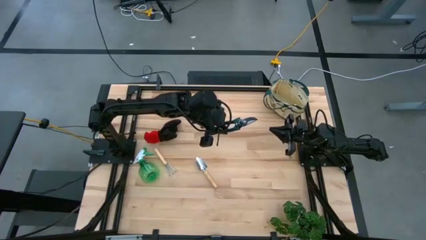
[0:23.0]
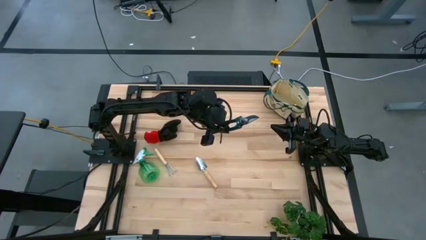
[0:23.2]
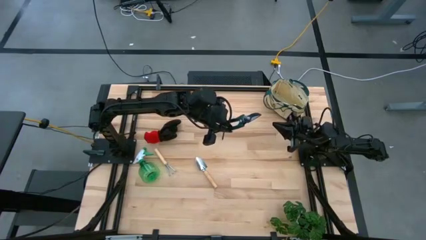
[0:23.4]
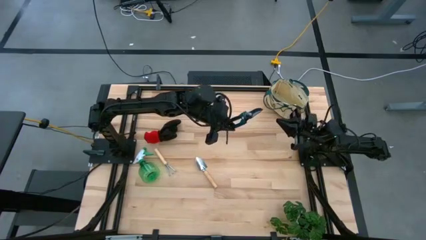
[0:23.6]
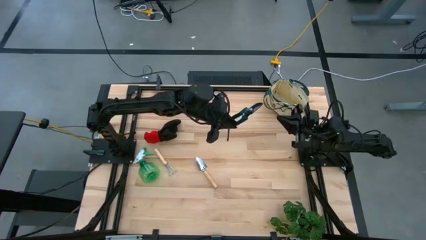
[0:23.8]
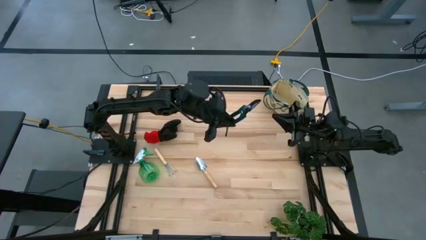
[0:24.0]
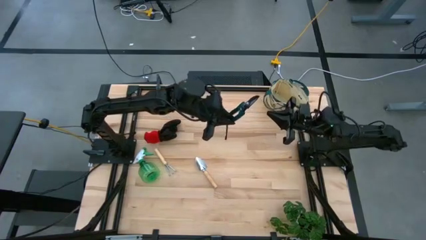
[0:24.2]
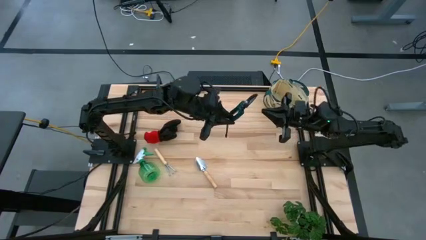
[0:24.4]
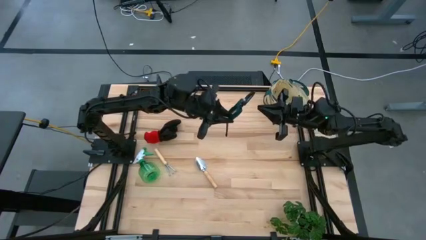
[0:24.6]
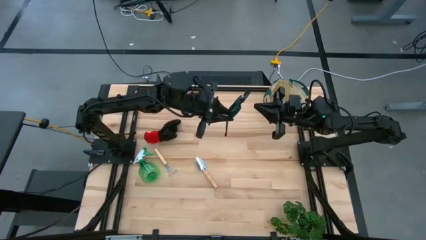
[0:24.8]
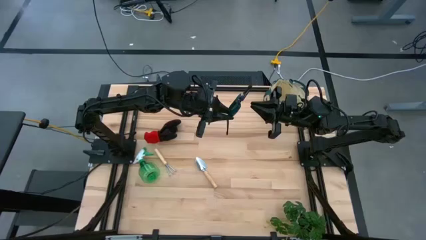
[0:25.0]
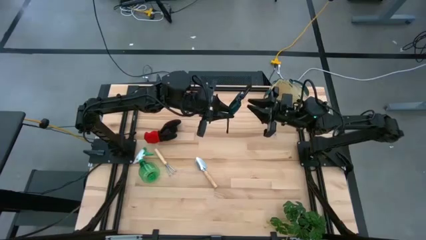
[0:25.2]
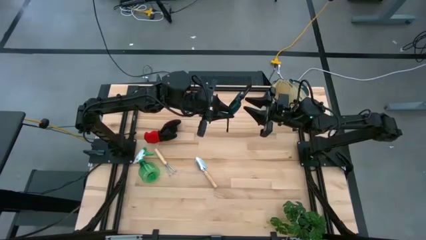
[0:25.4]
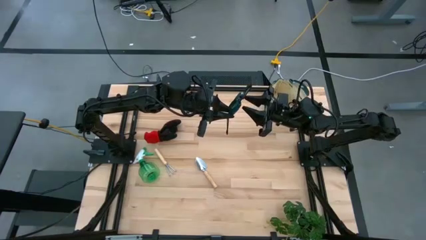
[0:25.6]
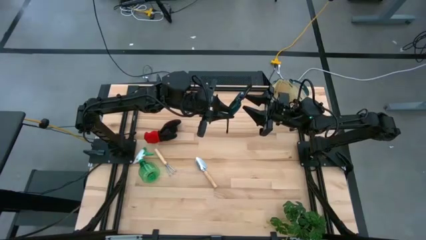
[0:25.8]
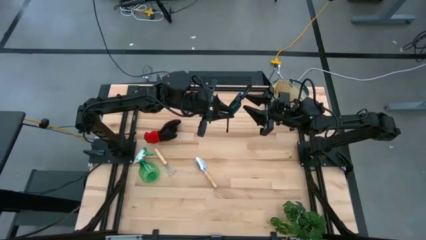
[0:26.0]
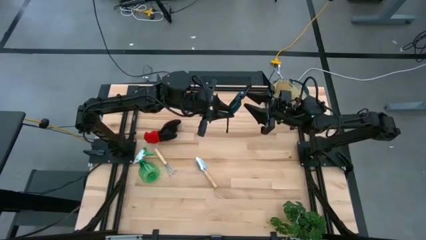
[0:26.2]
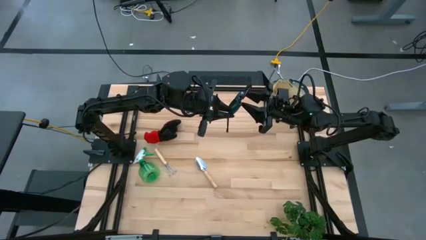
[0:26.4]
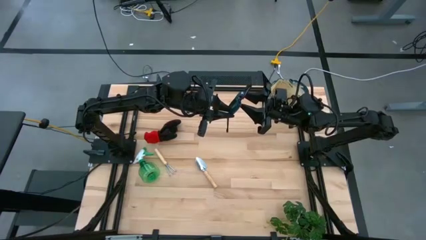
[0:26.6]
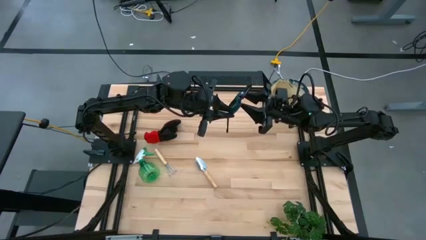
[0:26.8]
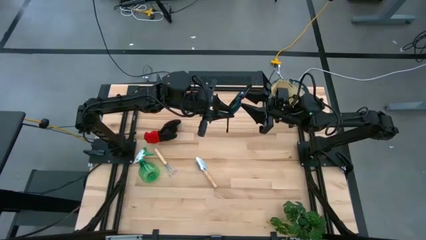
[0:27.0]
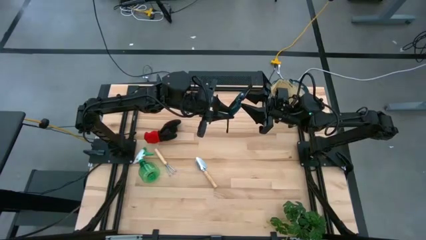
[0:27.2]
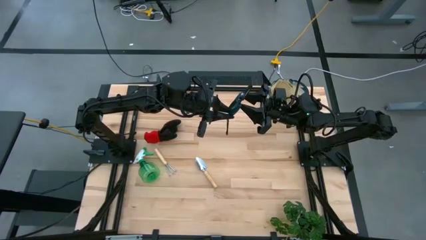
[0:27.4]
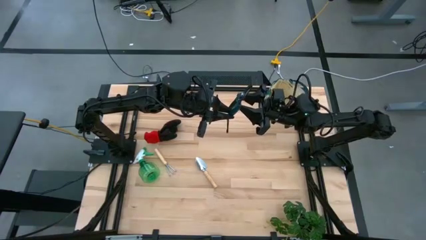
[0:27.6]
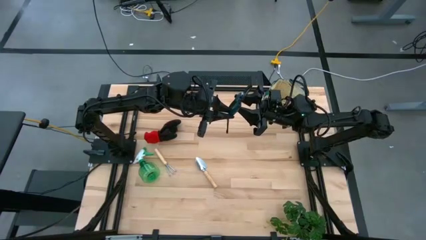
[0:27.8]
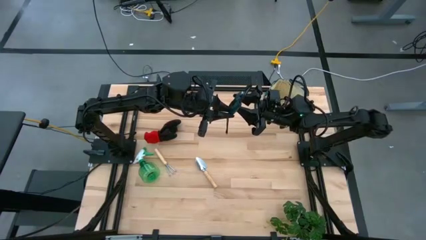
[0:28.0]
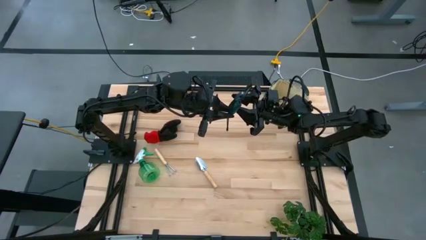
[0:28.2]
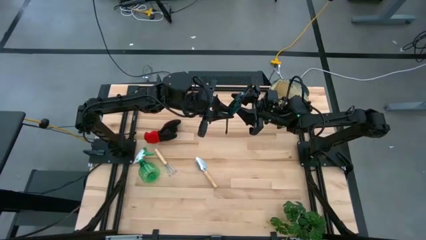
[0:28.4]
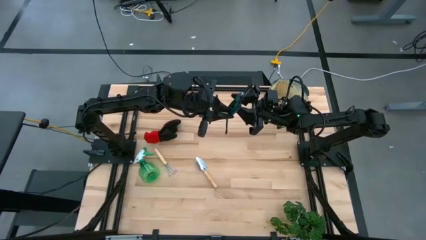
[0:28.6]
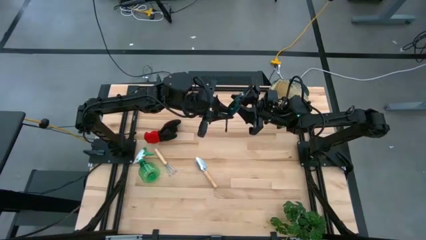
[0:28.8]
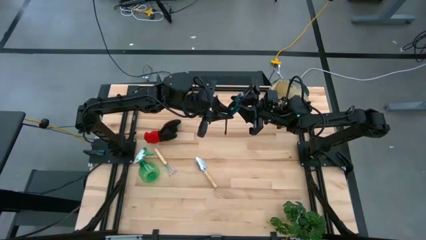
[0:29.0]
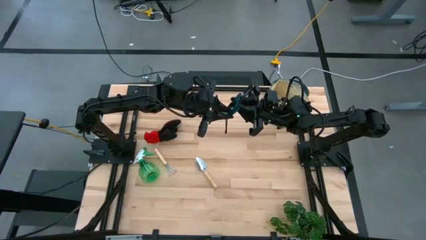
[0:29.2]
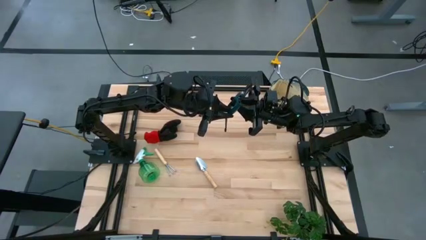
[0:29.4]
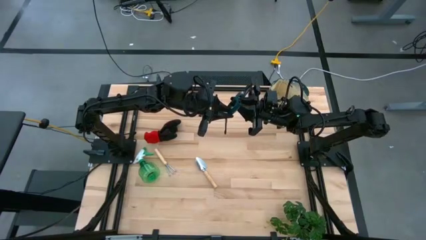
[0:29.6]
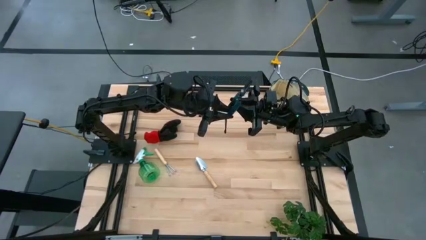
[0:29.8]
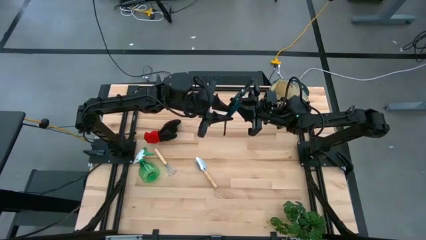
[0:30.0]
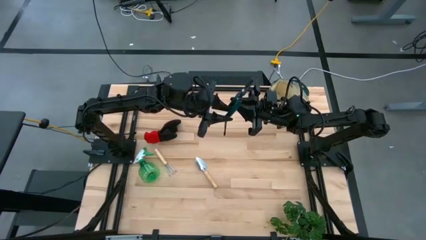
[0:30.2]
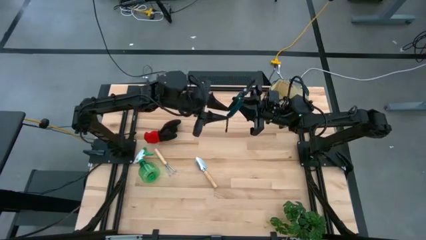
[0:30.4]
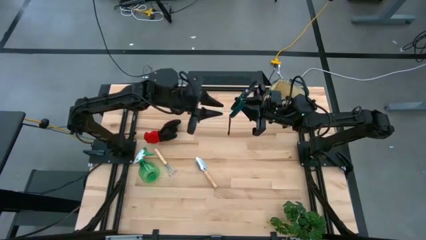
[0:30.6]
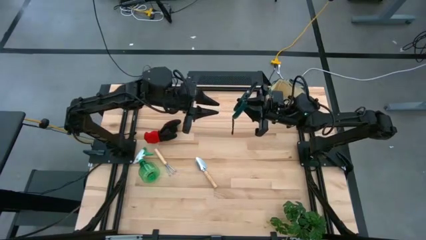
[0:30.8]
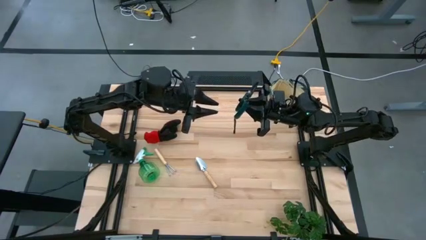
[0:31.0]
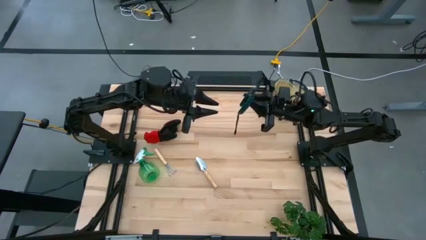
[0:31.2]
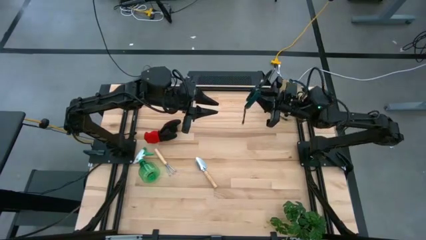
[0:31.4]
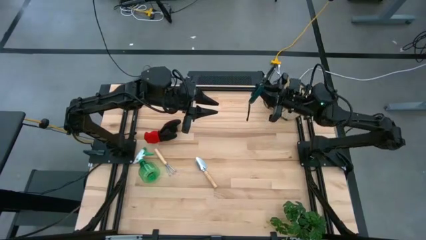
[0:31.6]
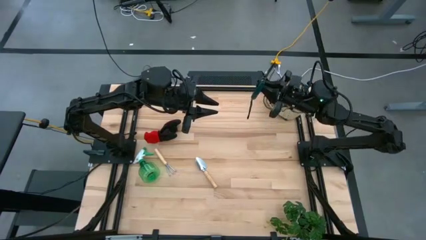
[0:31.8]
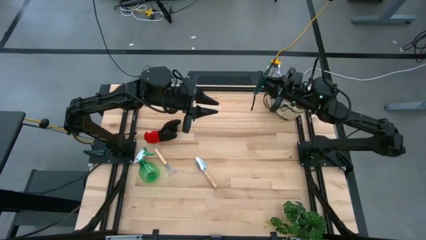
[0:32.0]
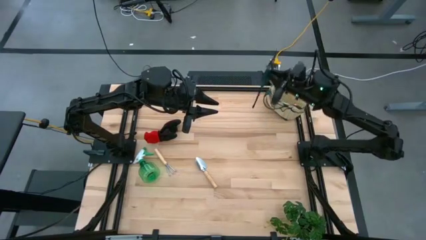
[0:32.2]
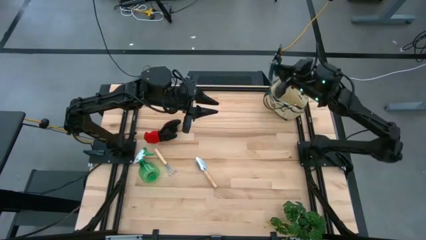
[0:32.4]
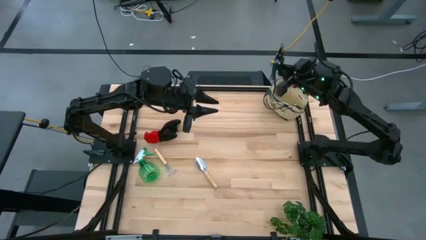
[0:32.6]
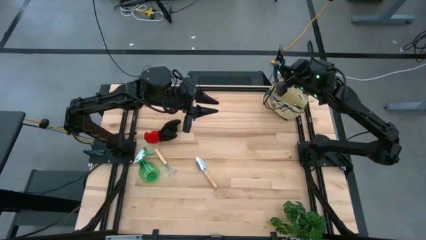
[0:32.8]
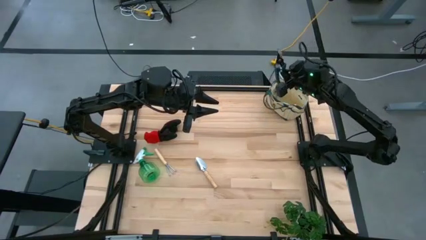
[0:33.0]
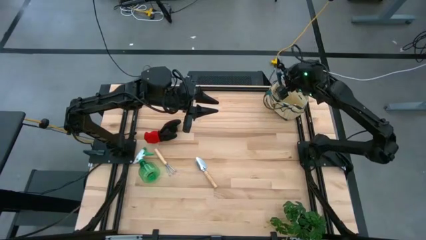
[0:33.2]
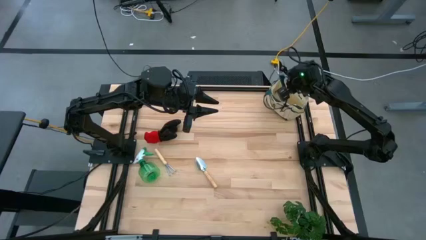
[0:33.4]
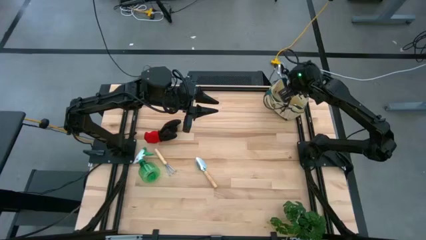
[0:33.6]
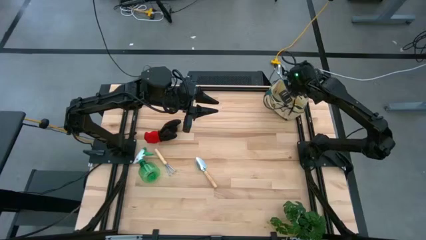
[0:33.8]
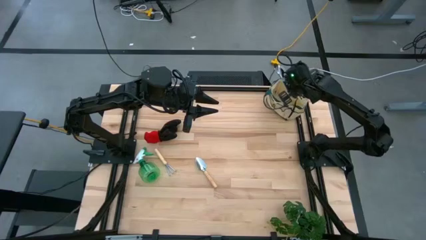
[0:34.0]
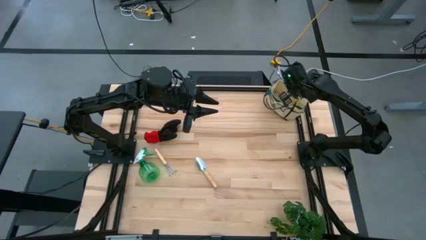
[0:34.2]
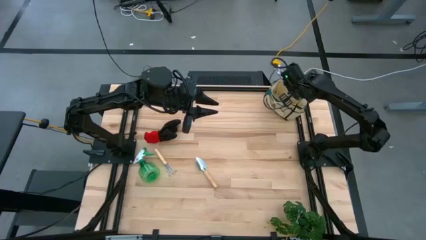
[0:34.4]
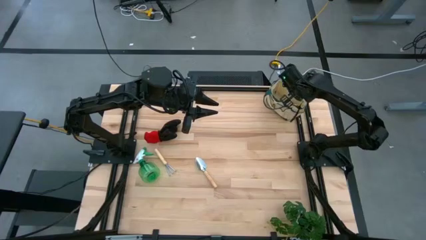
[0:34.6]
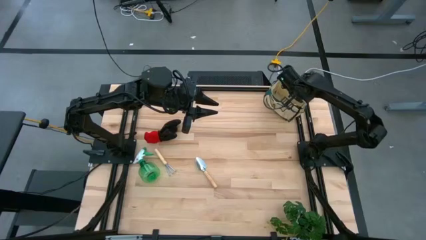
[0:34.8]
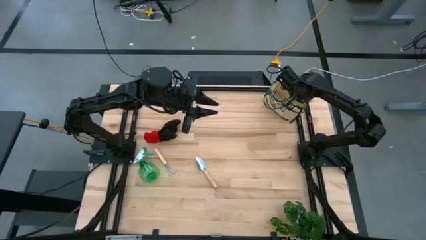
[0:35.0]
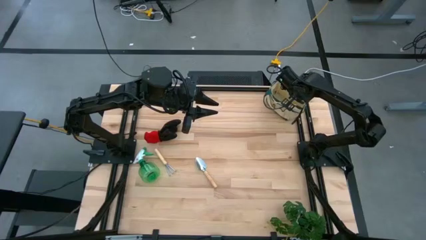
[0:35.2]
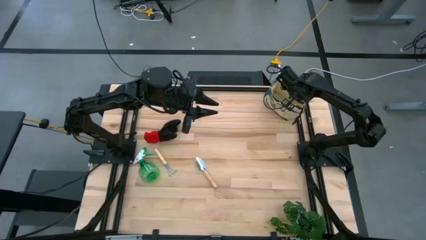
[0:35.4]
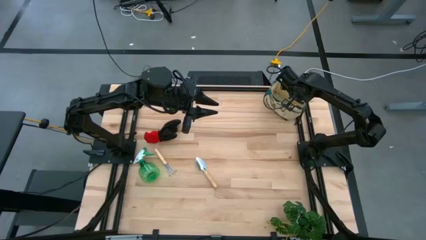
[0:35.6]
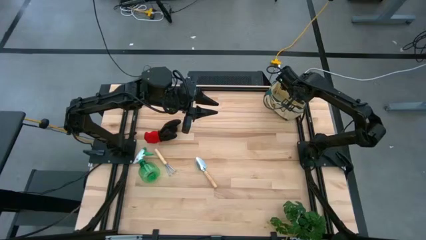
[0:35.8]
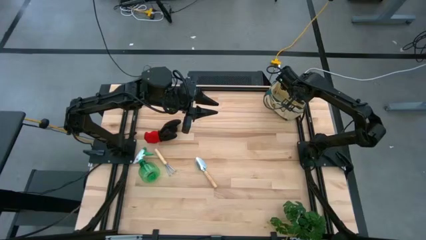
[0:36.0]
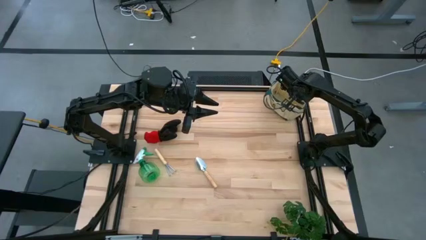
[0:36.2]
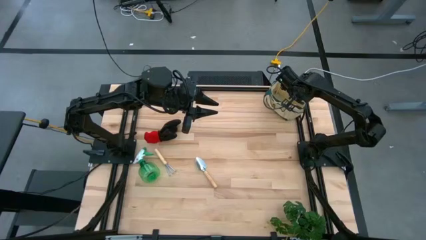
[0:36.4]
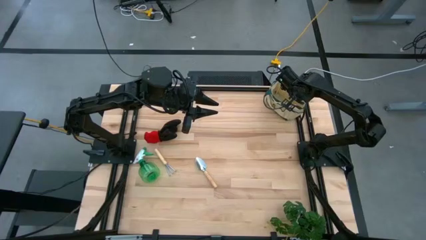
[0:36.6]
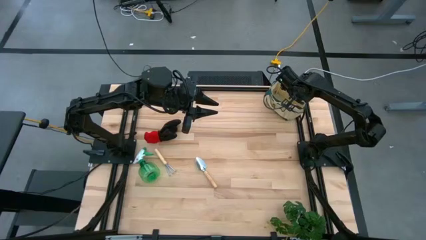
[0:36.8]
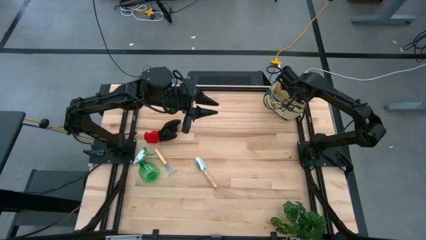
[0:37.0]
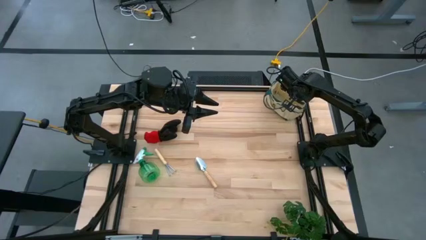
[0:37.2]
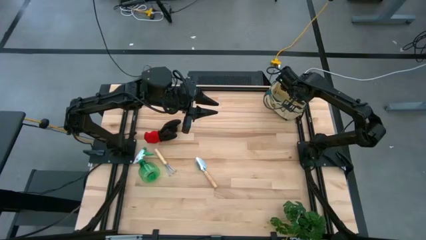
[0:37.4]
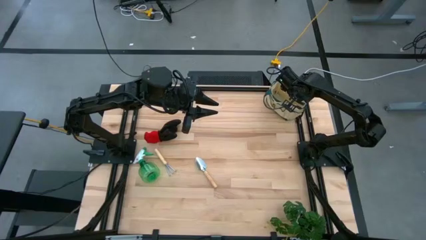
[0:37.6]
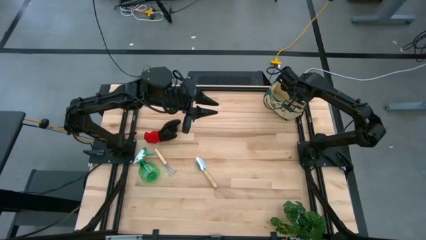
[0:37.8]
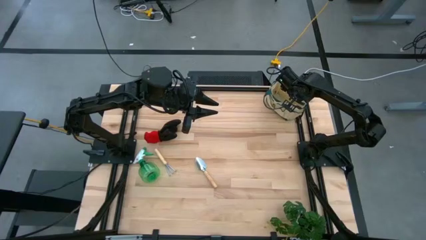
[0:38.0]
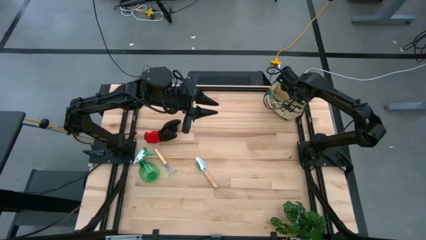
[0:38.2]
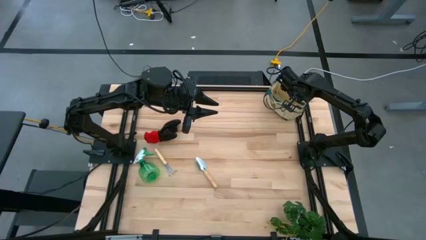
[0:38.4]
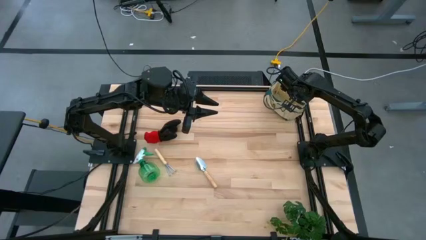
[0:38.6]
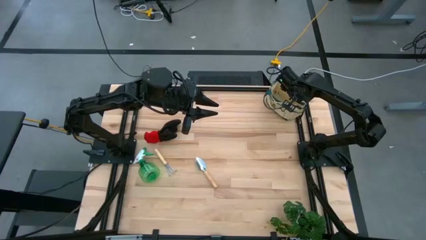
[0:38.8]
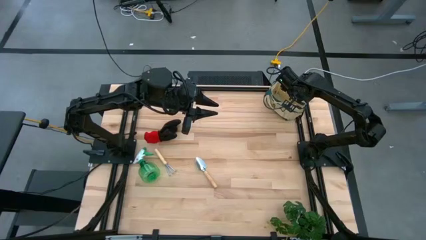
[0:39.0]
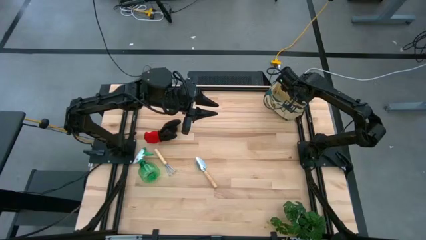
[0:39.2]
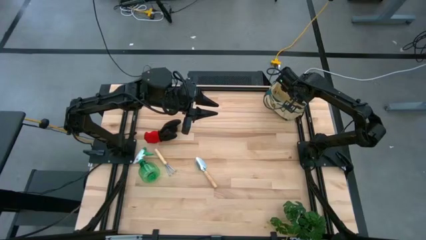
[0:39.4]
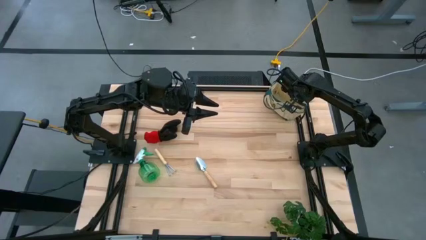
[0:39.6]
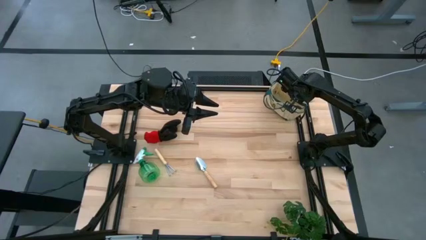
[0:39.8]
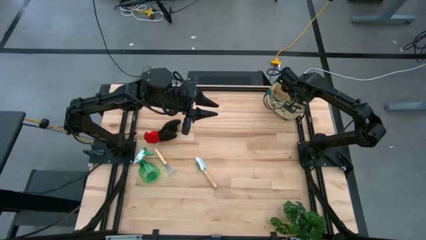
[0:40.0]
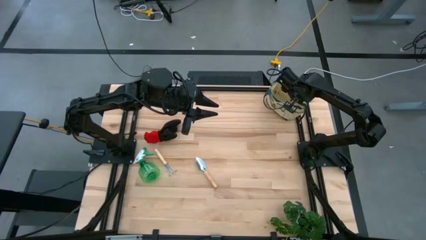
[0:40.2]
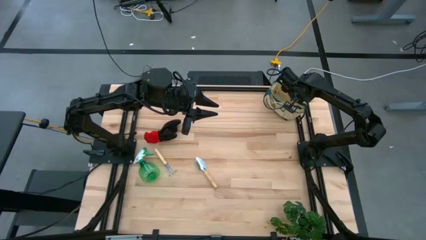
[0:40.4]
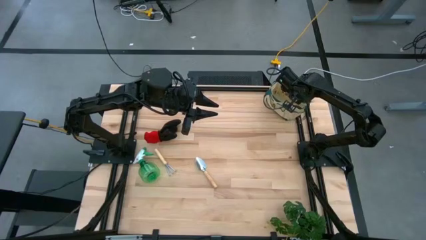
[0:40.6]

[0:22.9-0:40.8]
Task: Pick & Place Garden tools in Gardening bag
Put the shear scissor into the gardening bag
